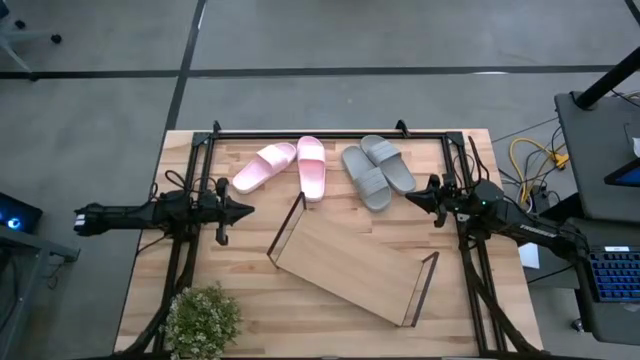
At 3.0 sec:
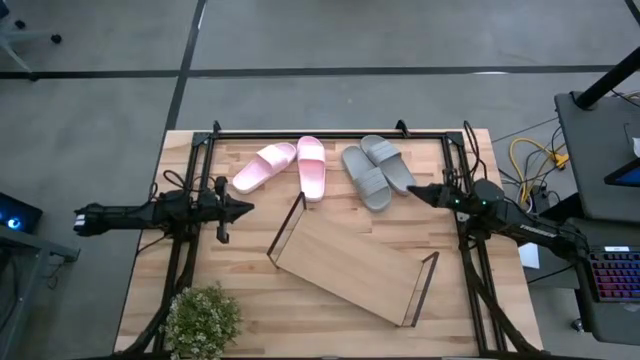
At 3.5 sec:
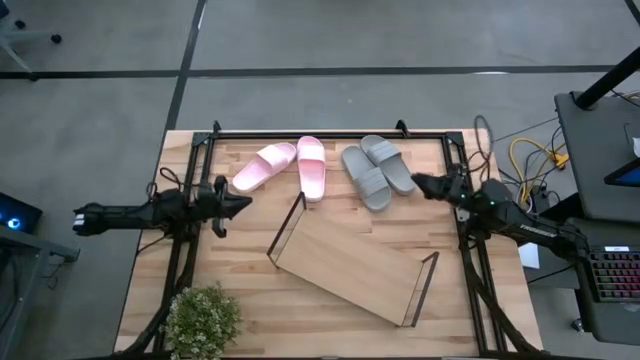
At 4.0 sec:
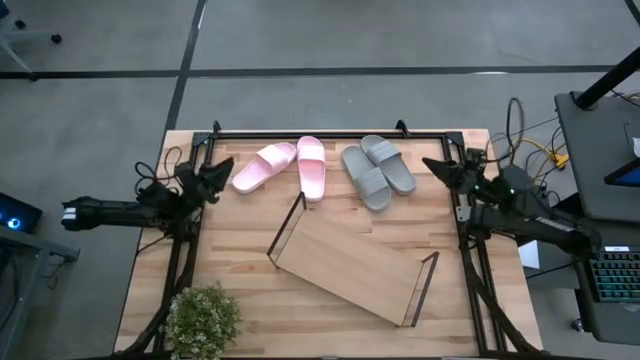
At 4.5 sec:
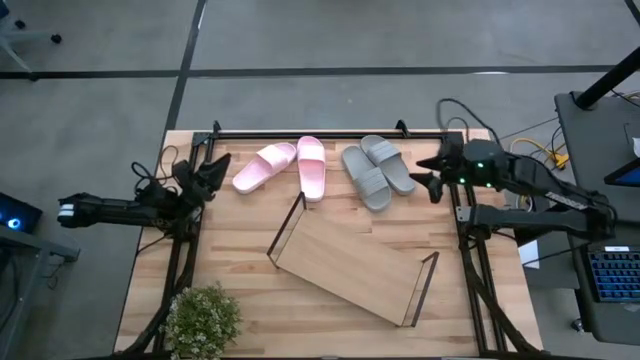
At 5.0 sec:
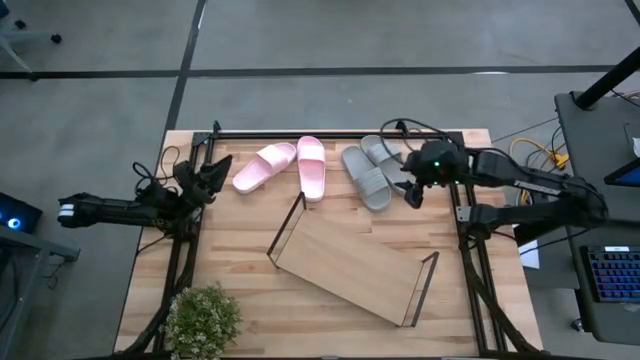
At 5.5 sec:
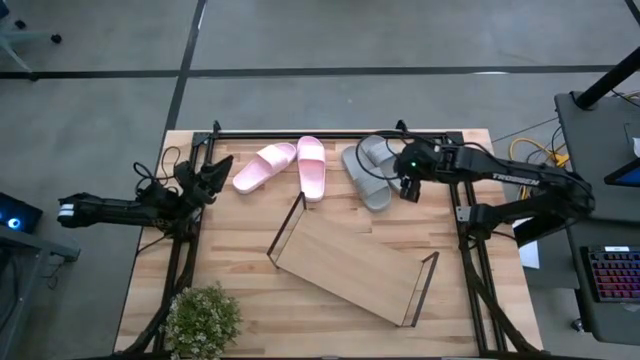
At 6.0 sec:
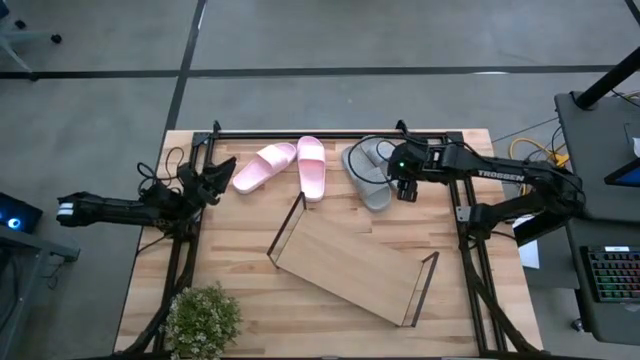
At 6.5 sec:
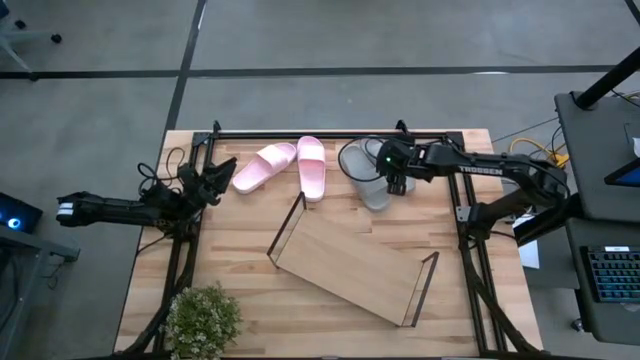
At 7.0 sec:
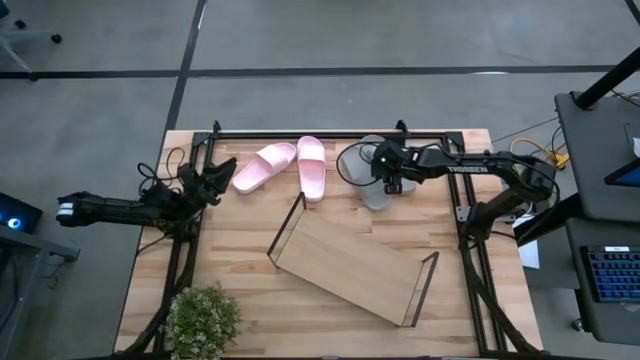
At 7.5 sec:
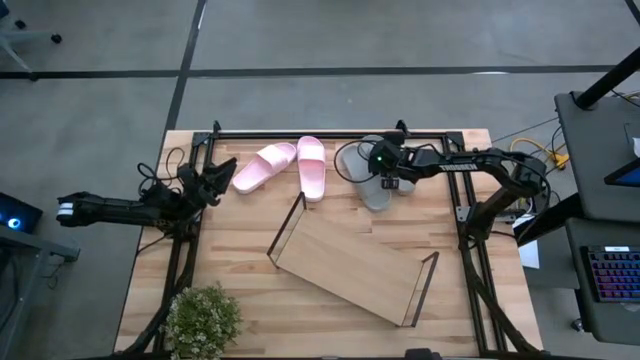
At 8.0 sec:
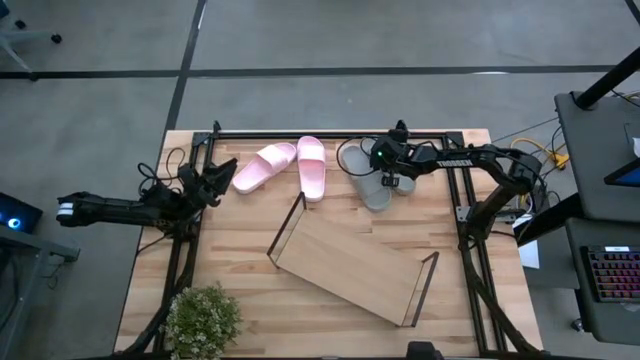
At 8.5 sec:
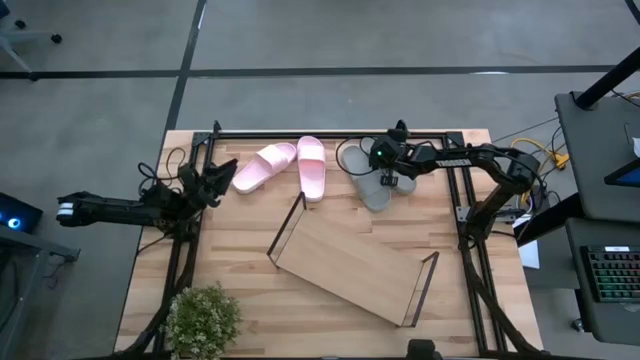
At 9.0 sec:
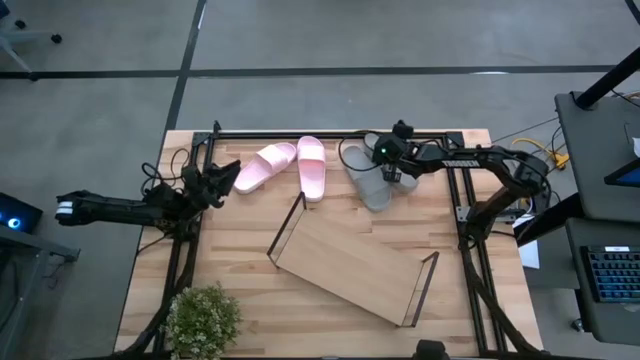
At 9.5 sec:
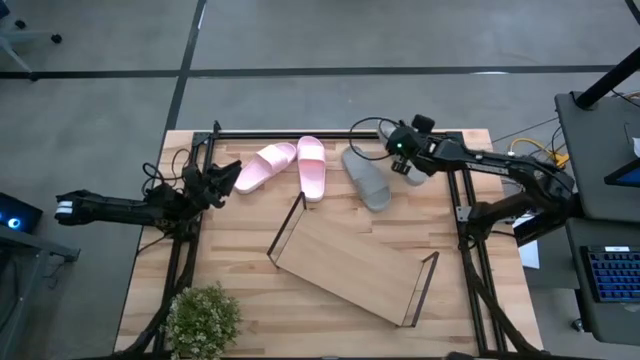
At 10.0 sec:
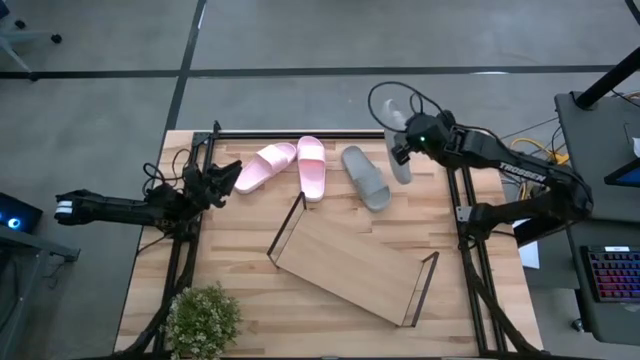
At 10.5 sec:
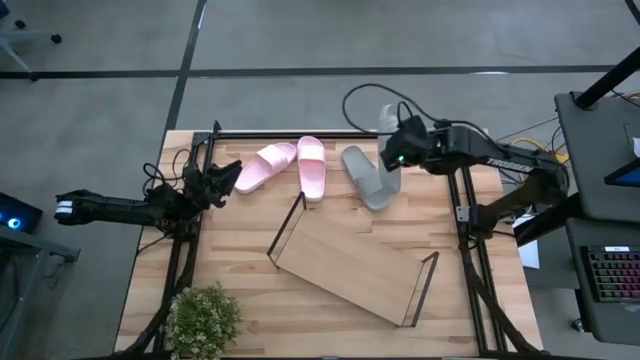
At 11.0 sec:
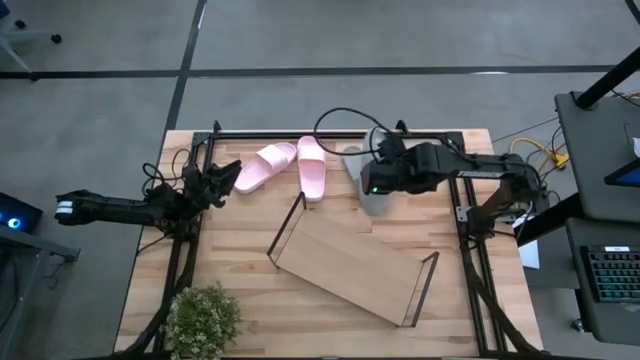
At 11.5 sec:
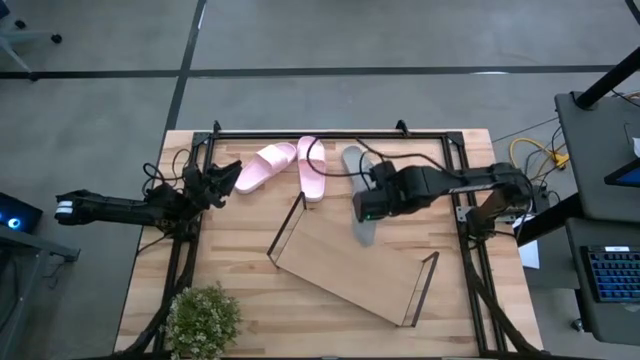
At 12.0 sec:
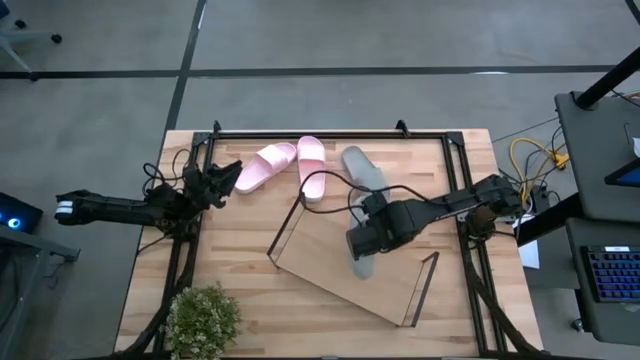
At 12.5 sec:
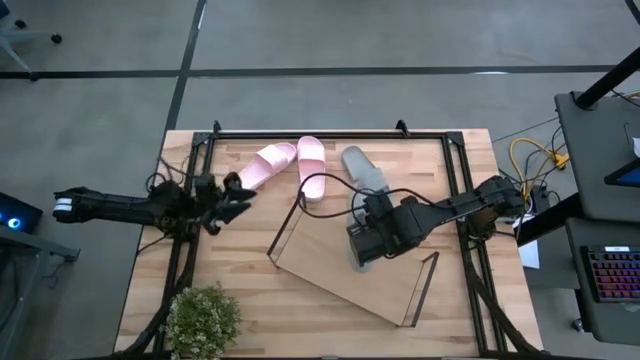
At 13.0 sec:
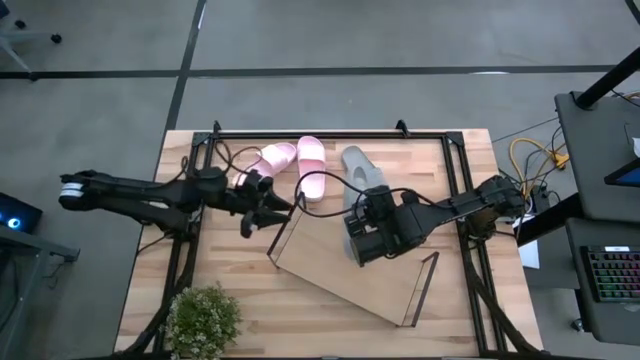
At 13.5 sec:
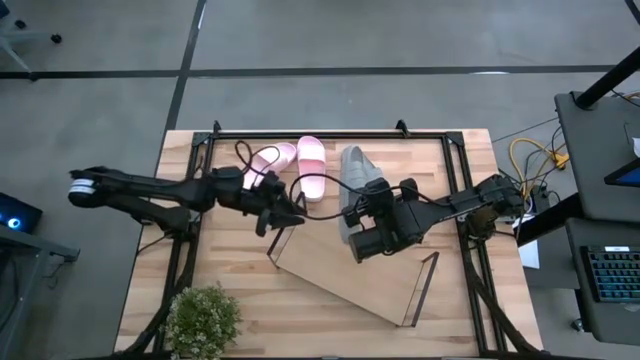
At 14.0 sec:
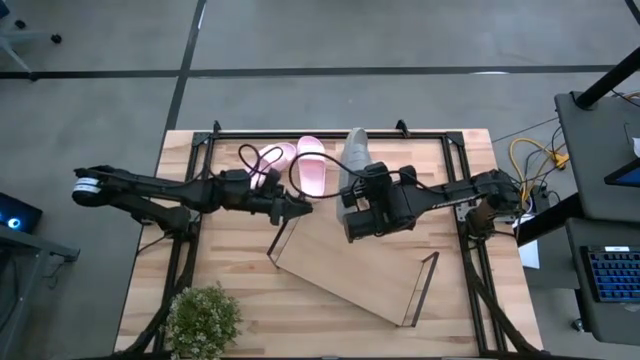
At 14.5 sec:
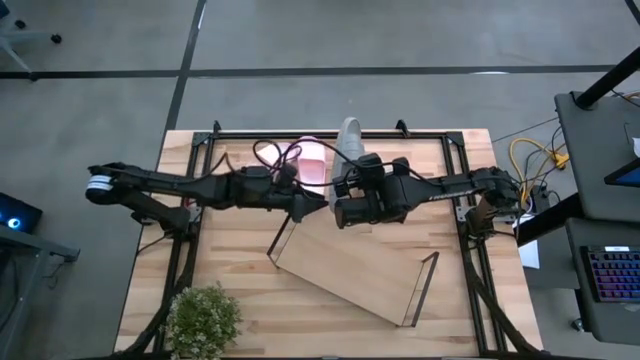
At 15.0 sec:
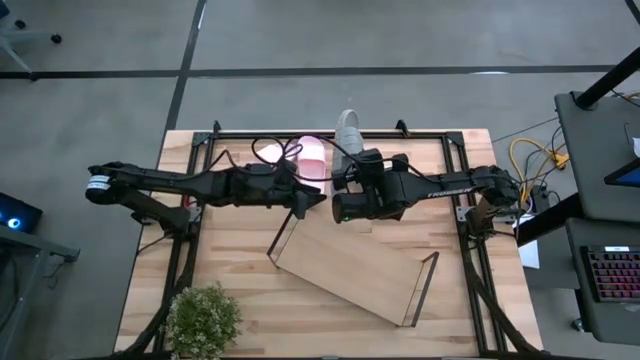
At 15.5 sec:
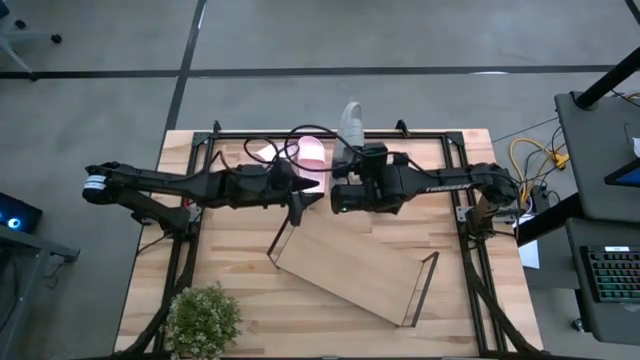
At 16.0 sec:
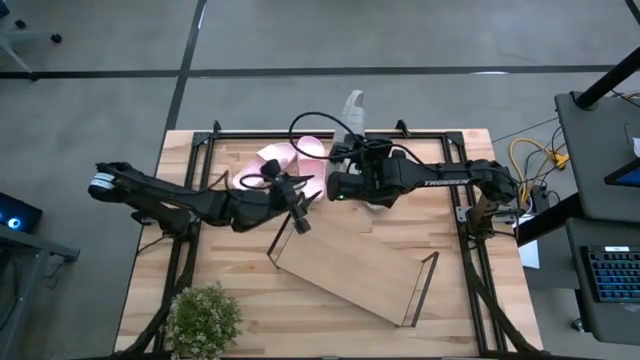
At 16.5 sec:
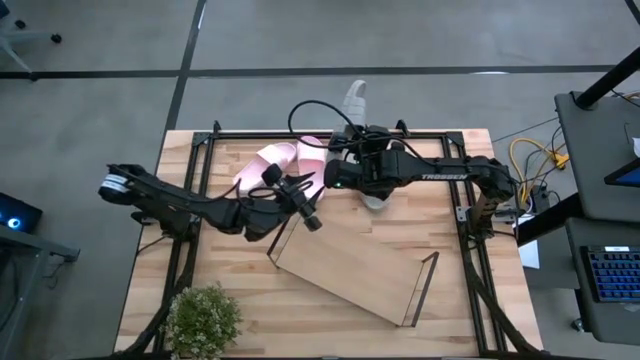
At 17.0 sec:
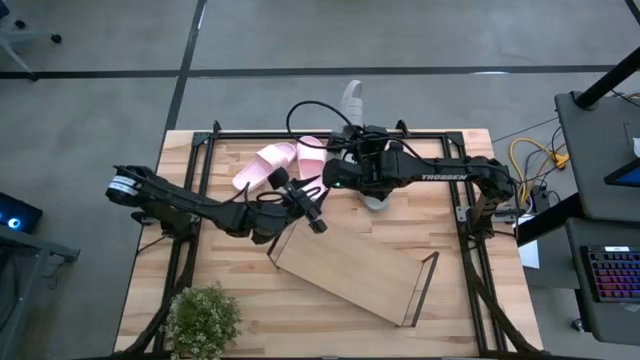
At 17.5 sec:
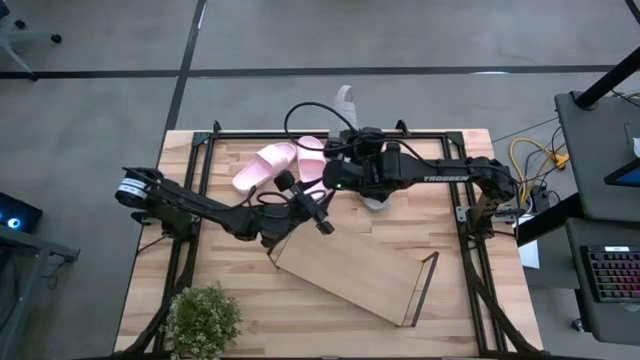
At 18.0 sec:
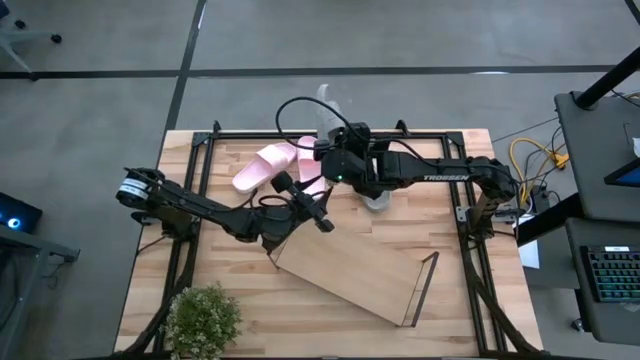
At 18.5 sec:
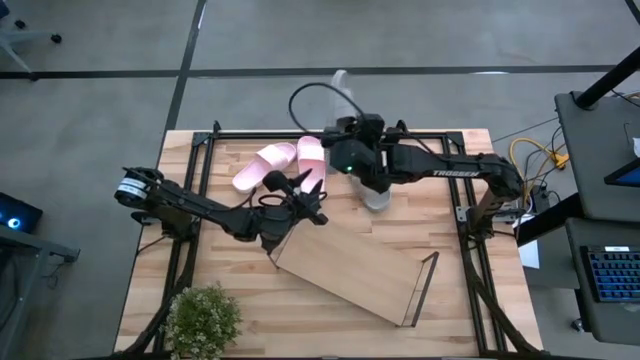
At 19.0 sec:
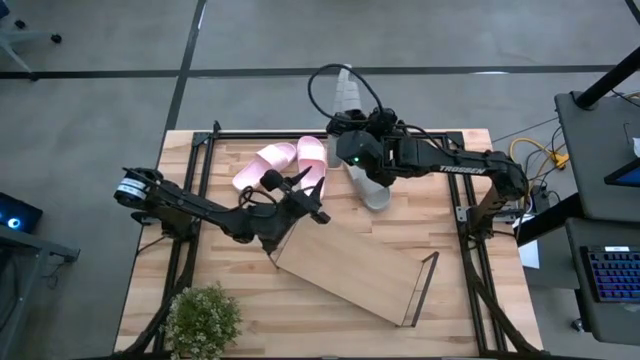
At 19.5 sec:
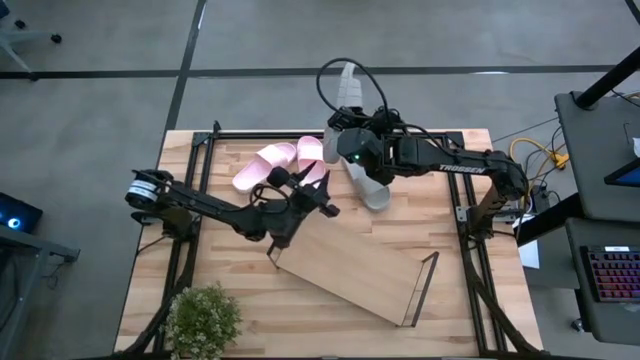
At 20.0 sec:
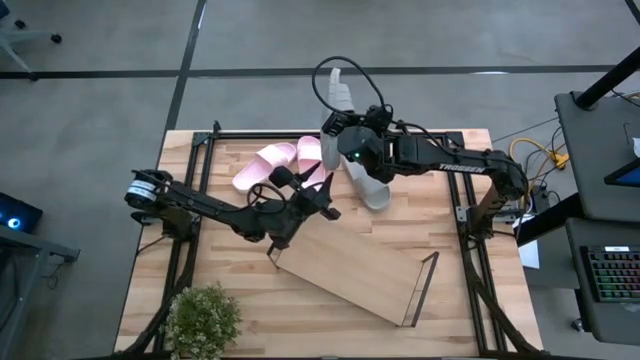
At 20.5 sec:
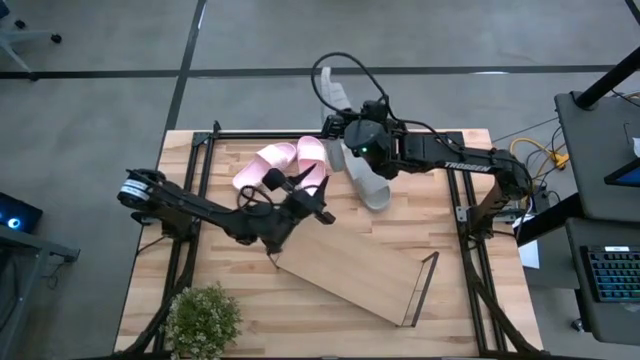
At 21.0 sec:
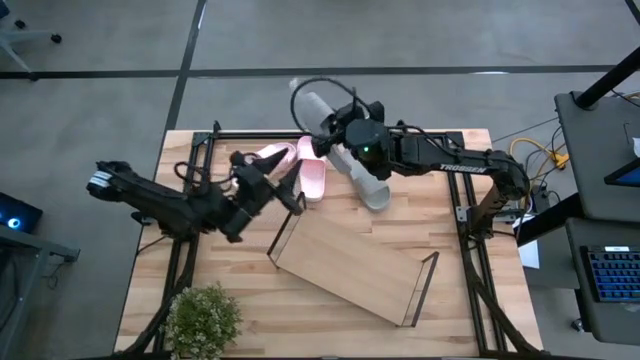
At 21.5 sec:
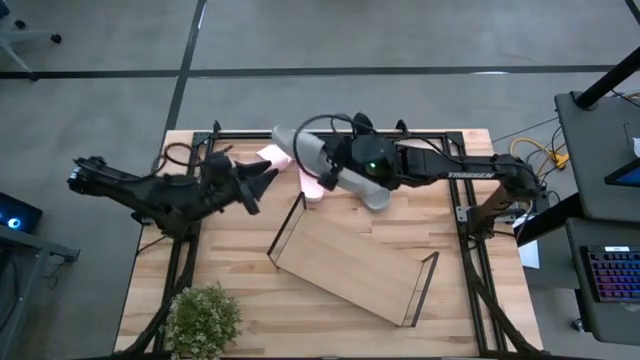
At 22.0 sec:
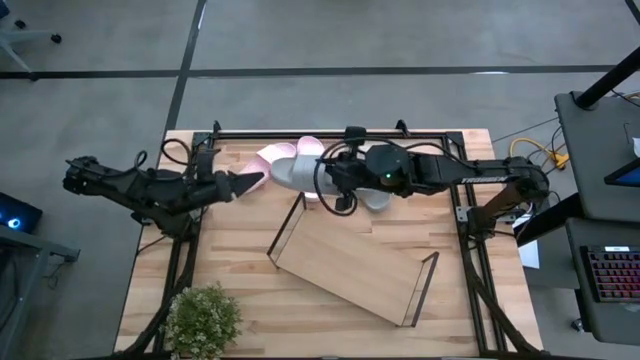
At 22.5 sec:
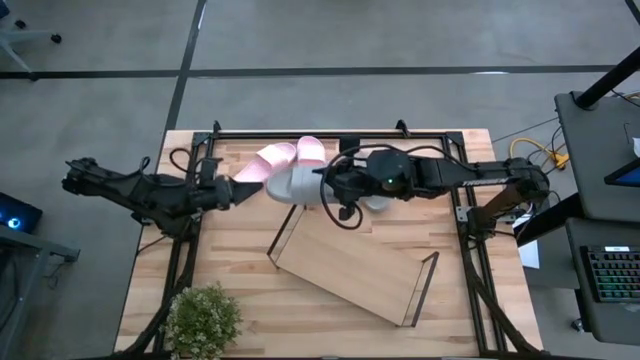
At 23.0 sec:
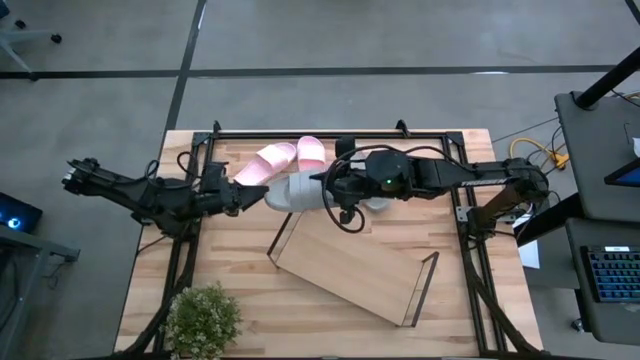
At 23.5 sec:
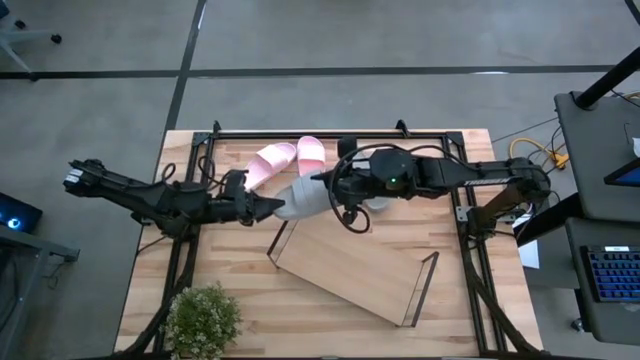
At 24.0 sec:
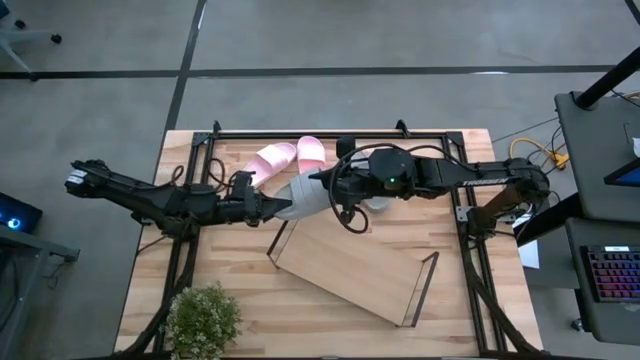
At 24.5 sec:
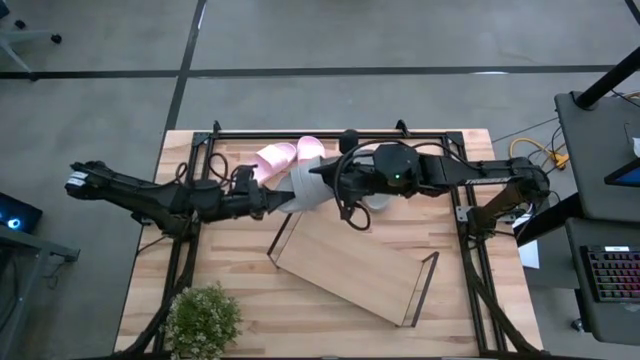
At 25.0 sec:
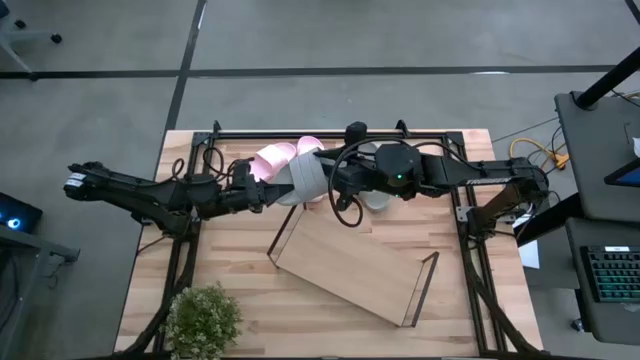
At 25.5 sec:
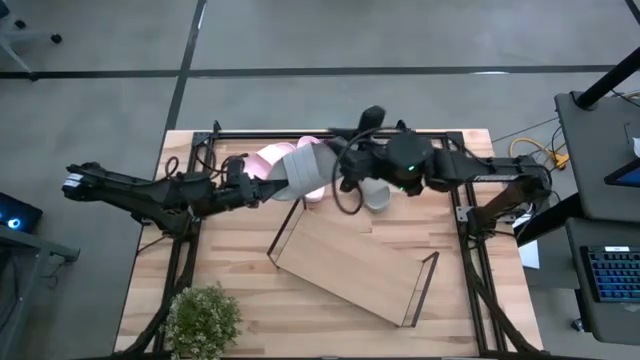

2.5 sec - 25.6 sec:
Task: Pick and place slides into the shelf
Put the right gray slipper on the shelf
